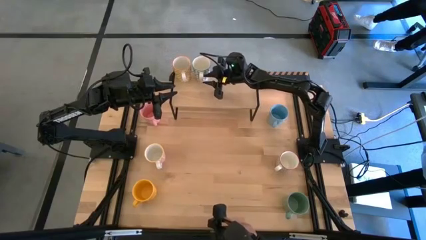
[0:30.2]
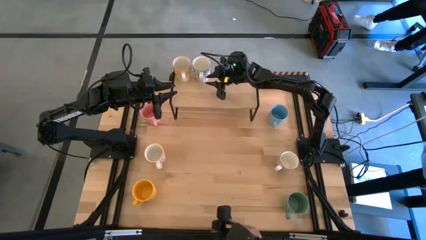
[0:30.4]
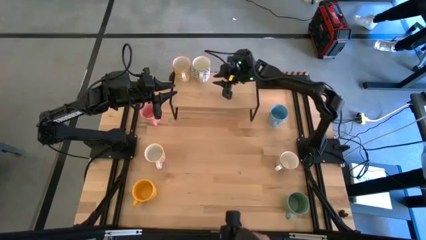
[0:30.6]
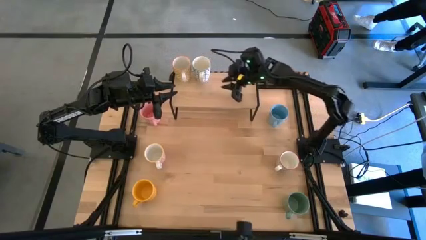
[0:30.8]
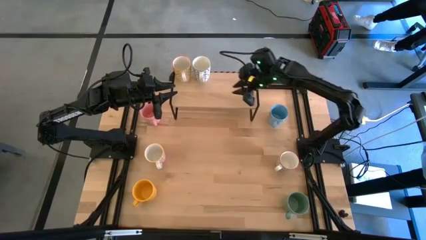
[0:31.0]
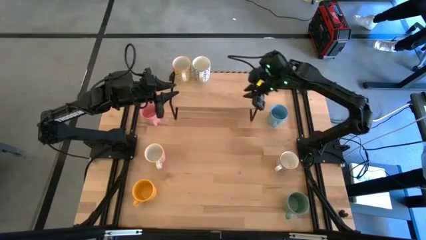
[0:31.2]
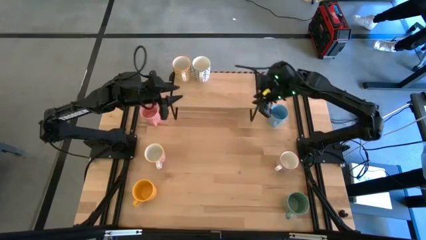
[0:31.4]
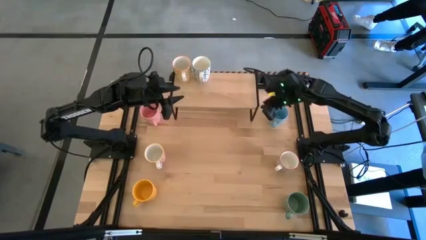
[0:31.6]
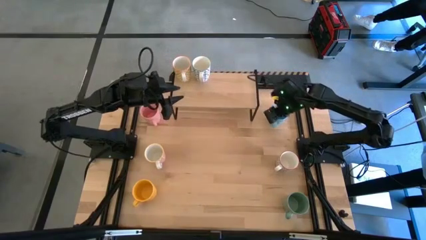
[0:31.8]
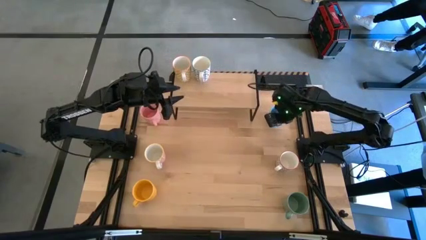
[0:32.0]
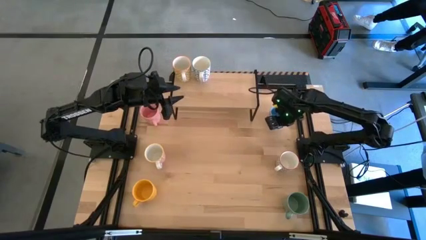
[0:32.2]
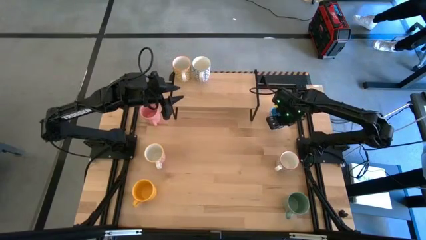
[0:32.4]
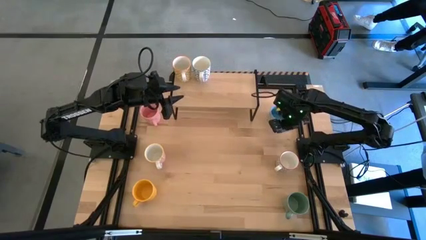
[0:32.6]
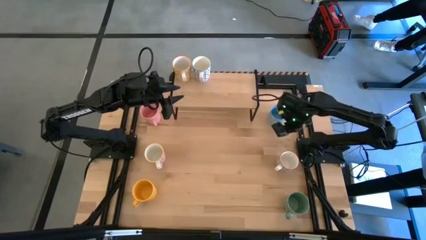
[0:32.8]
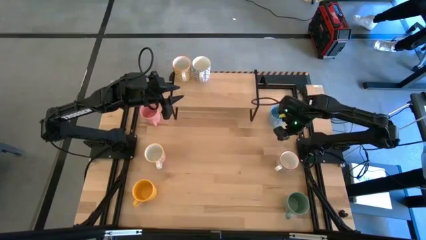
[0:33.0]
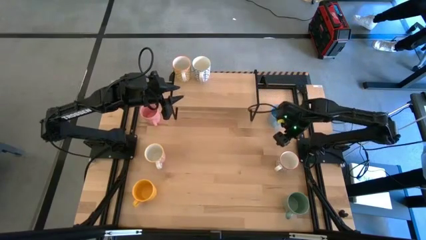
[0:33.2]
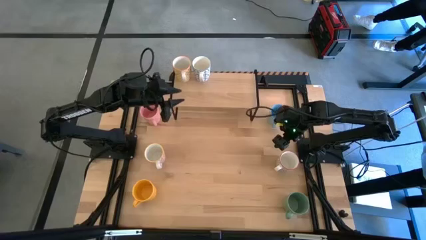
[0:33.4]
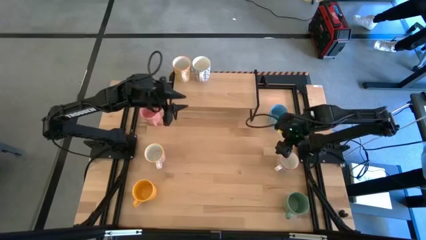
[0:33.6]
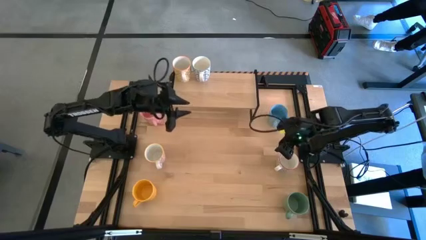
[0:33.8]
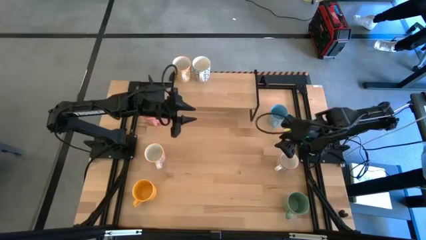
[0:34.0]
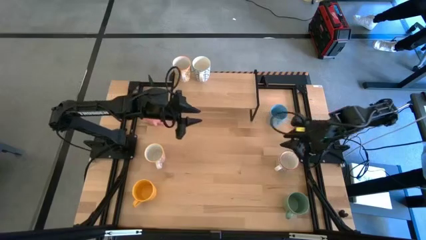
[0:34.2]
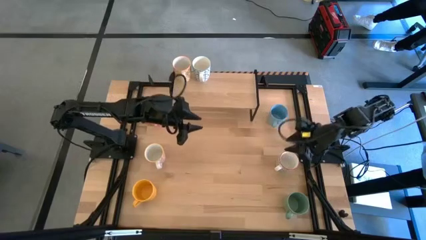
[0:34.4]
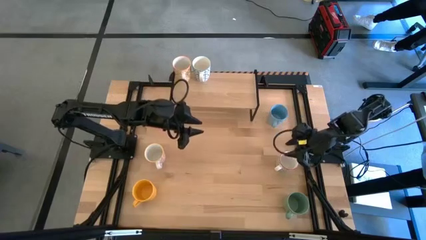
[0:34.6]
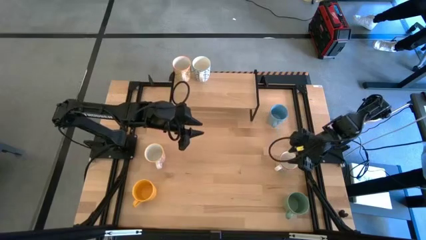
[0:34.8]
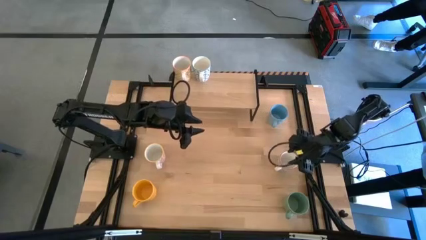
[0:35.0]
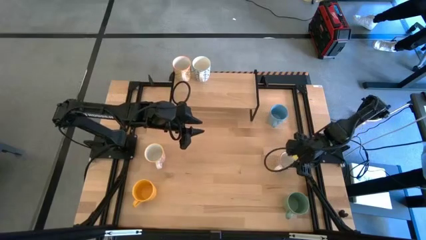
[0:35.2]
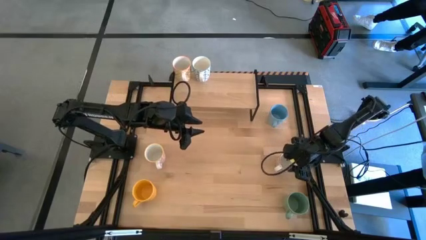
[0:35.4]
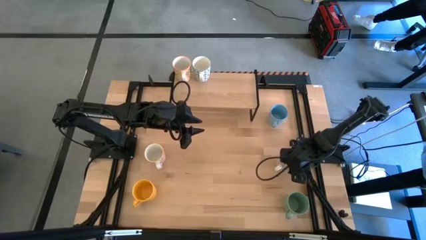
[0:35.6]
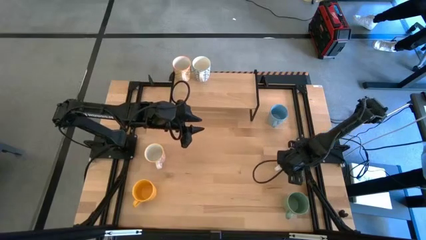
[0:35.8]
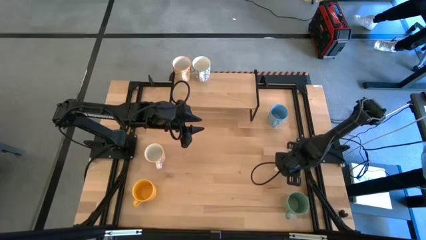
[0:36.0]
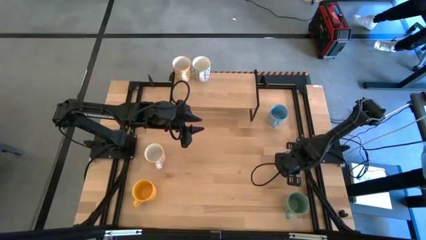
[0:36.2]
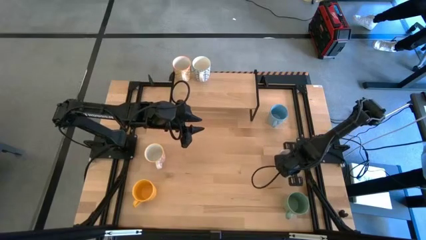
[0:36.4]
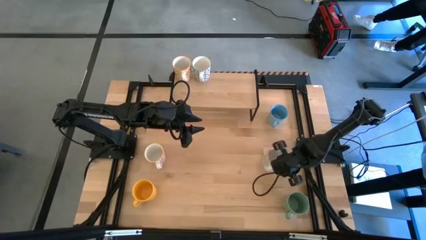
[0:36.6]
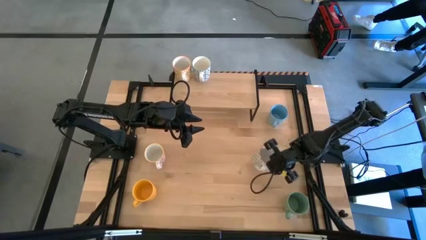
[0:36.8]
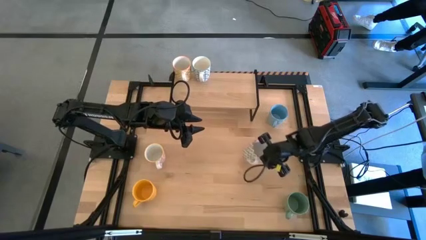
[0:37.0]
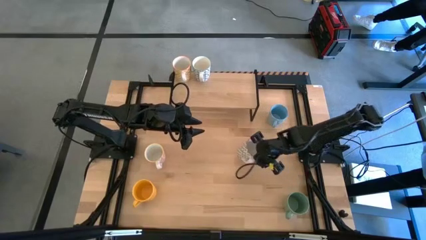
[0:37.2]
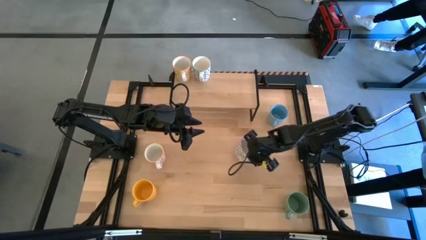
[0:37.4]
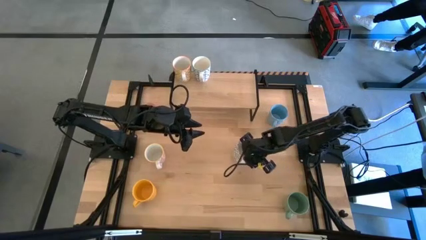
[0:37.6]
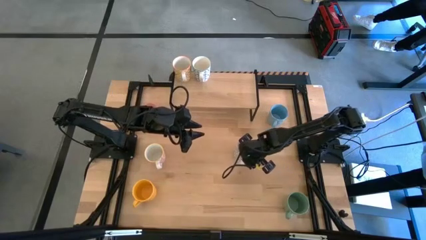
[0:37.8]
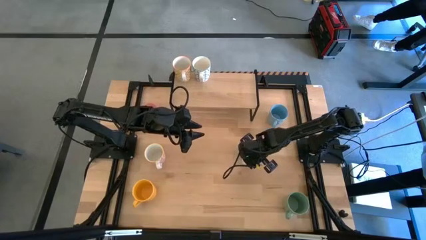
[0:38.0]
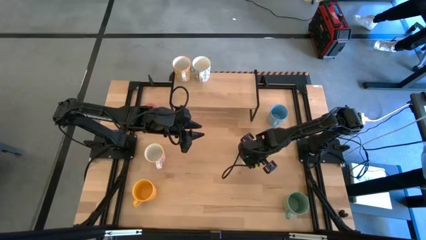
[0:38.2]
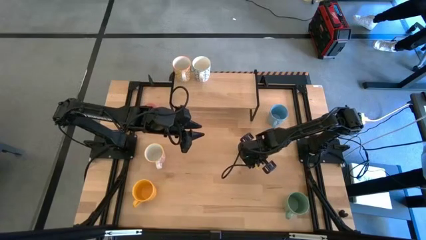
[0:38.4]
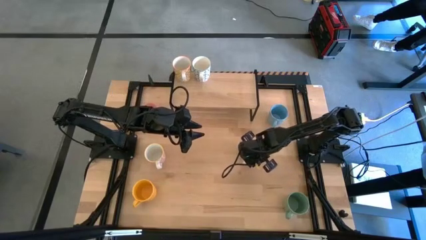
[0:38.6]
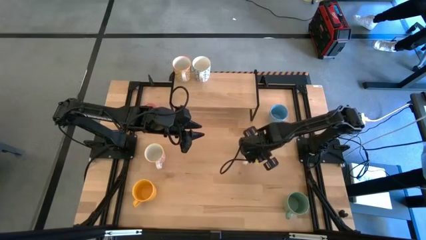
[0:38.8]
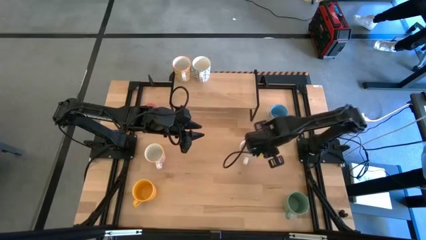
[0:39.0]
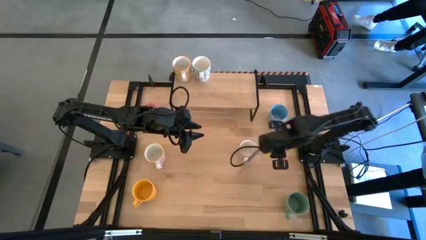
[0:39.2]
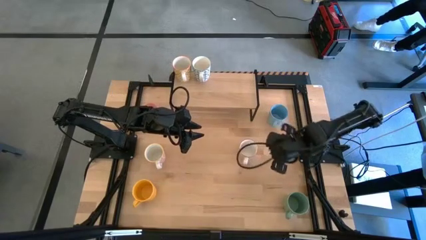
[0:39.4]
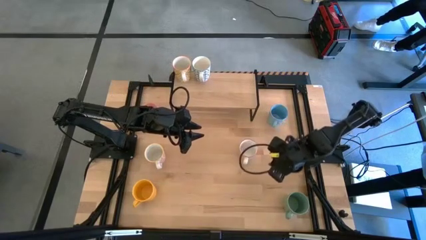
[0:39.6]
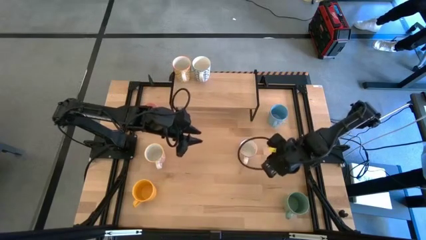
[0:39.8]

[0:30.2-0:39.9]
Task: Place coffee mugs
Put the gray pattern mug on the shelf

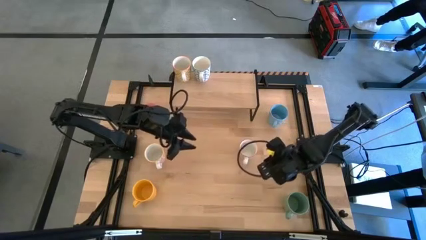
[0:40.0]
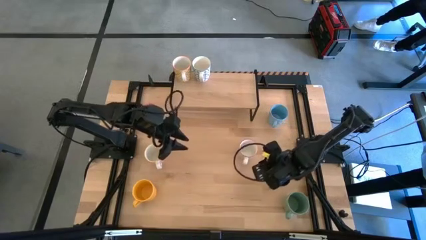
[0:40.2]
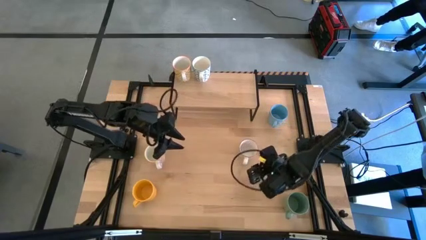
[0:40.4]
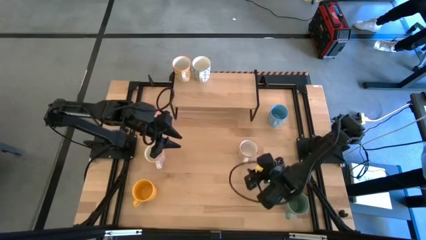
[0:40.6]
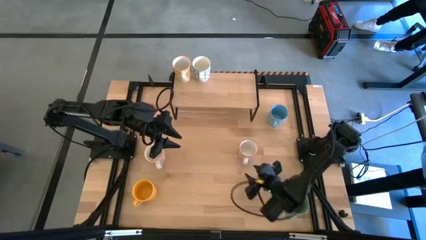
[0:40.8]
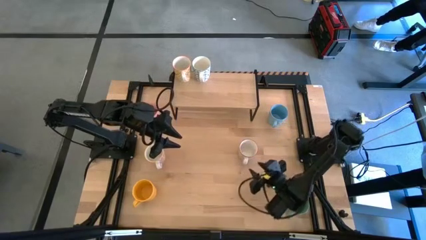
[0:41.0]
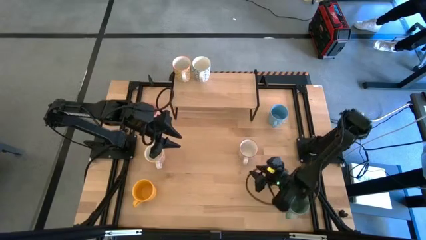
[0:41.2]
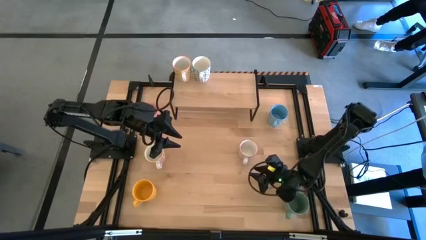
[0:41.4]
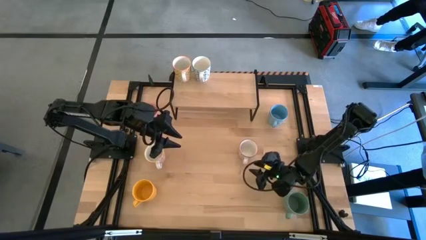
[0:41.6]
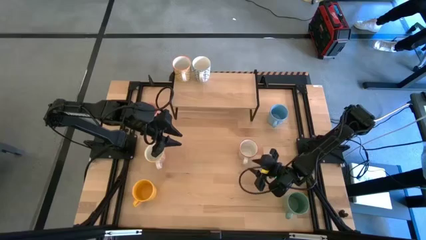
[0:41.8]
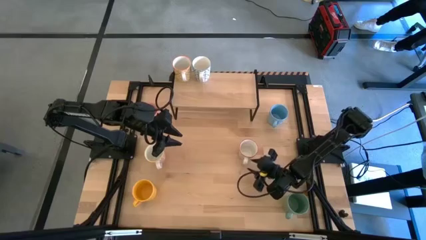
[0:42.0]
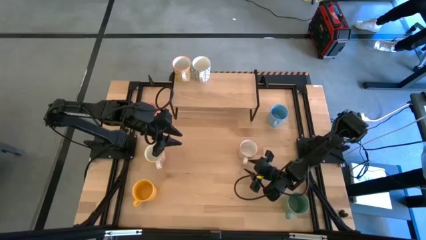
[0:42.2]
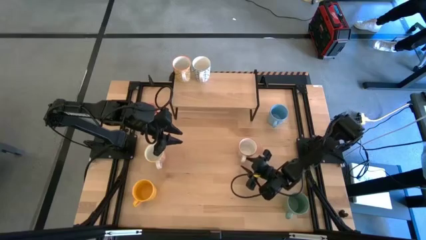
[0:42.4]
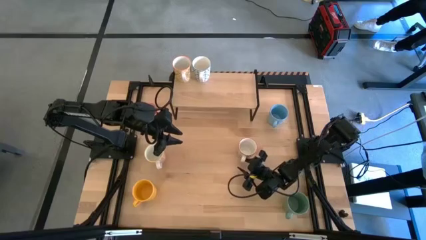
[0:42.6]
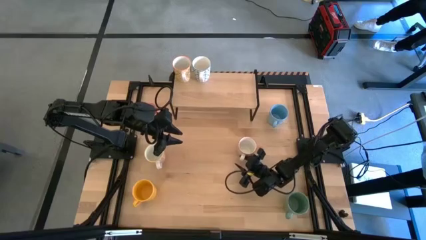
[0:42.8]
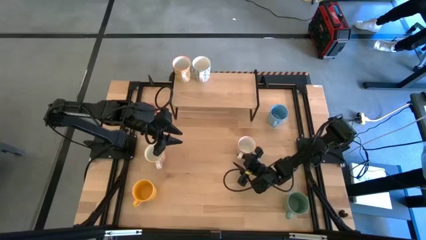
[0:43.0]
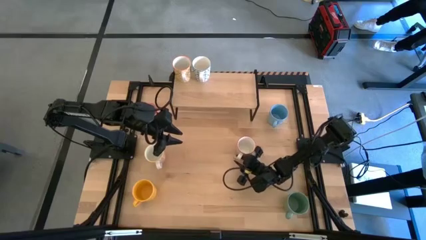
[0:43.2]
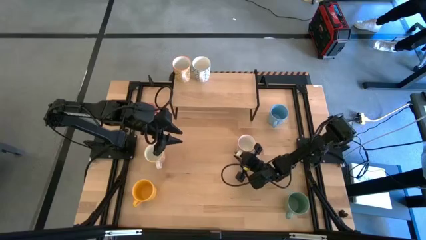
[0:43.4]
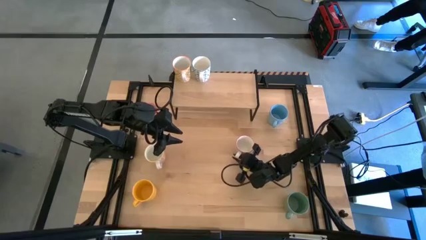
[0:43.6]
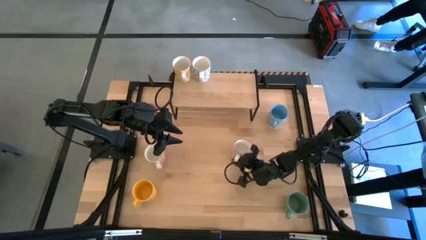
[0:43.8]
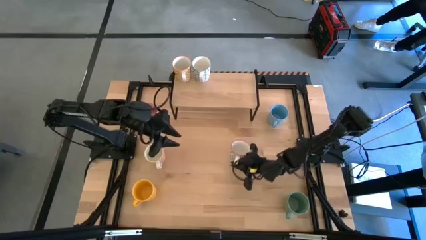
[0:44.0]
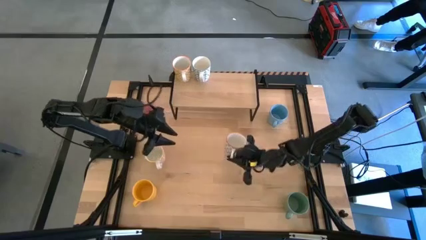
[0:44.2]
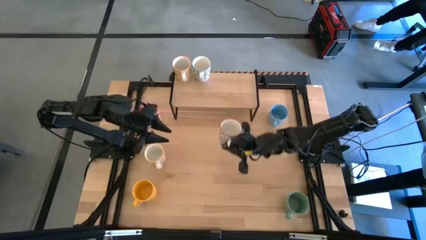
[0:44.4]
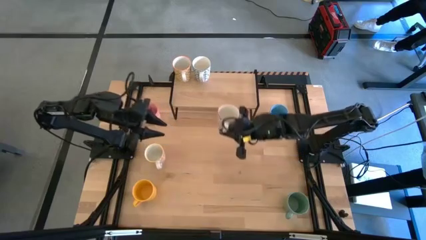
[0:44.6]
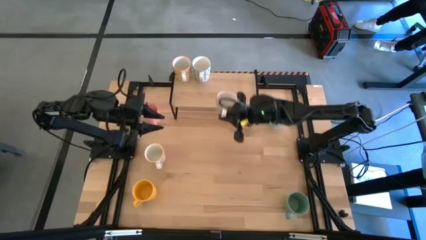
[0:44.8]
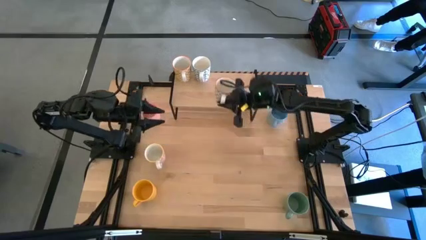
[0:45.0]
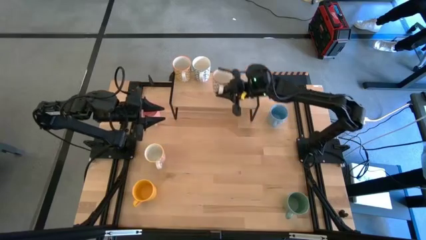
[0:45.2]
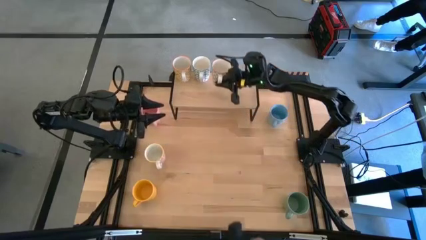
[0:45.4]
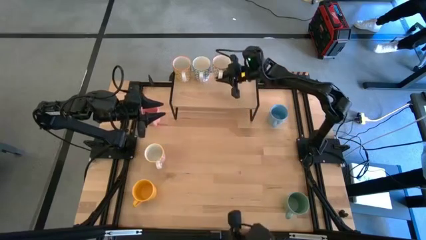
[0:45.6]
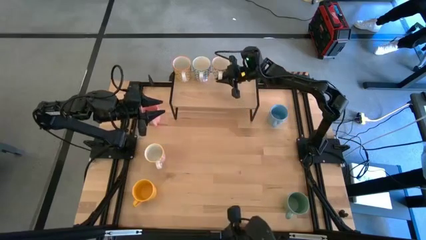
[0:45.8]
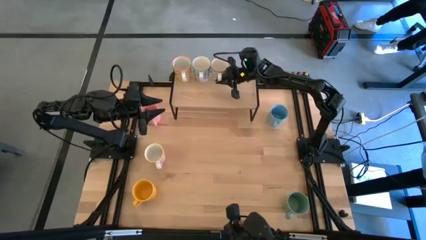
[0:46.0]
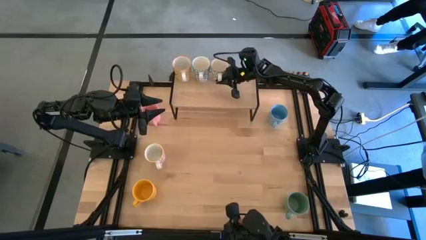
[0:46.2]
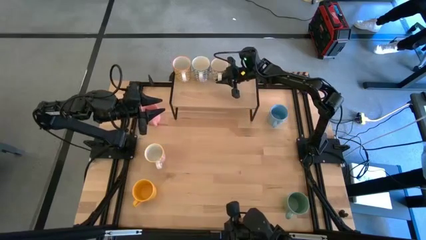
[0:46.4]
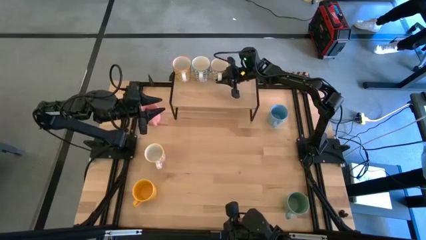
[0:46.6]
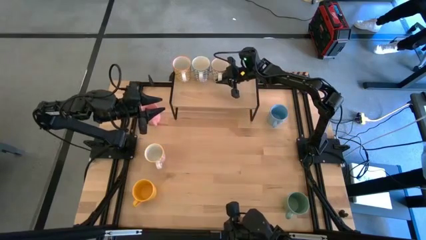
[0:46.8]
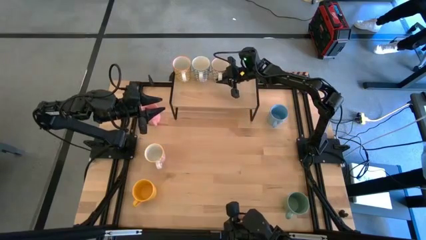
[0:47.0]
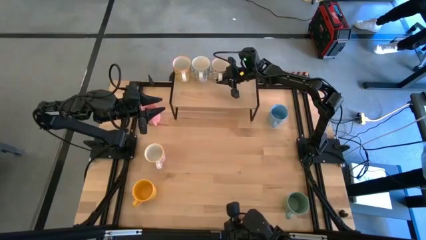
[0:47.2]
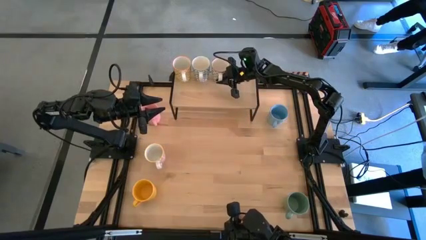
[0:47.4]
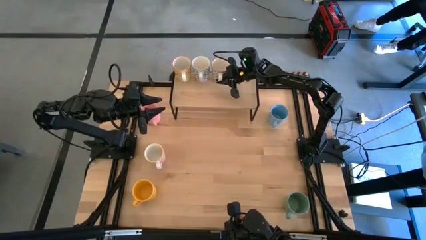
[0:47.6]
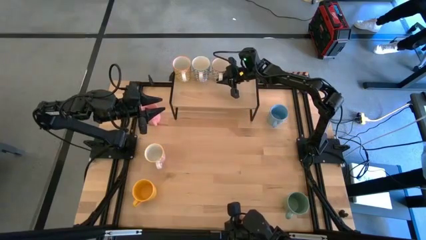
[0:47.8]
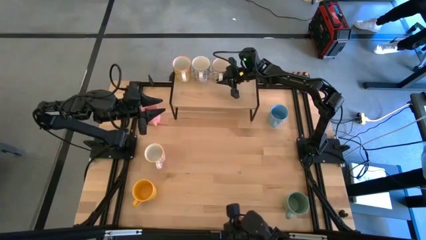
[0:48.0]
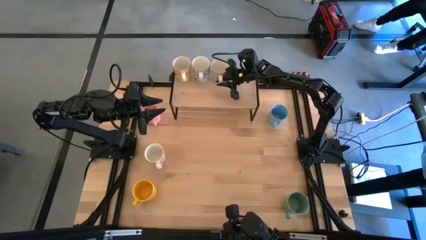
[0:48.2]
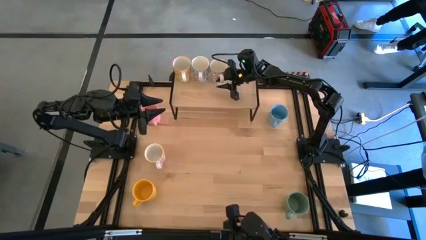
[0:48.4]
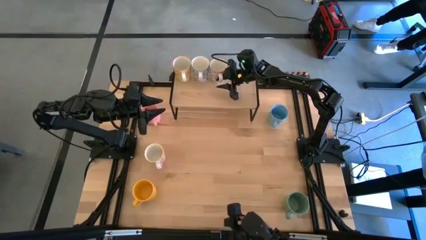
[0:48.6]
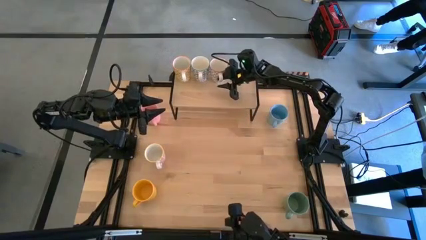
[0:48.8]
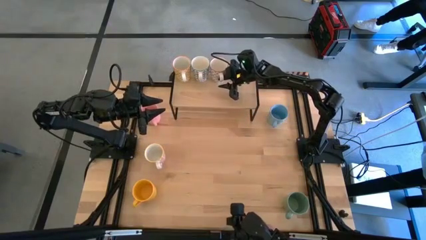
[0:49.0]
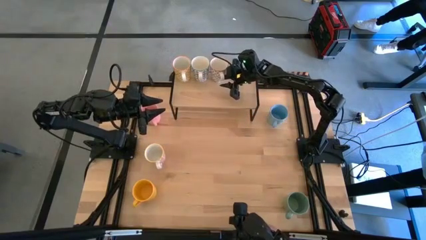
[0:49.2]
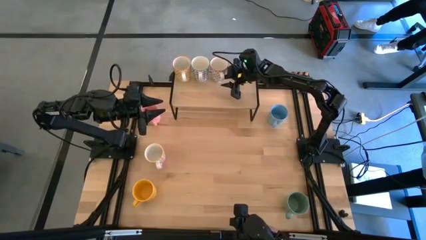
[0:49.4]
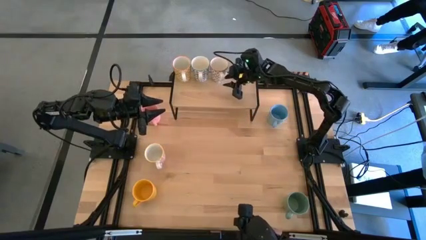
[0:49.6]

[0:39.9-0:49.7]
Put the gray pattern mug on the shelf
